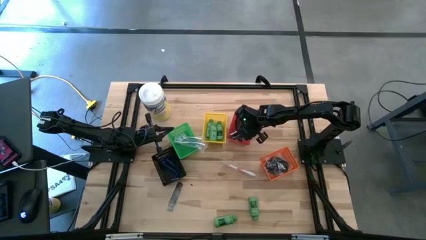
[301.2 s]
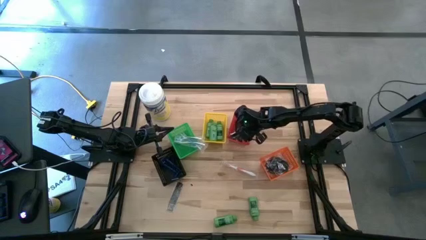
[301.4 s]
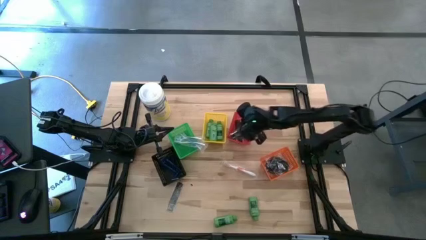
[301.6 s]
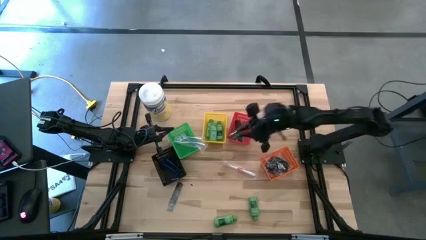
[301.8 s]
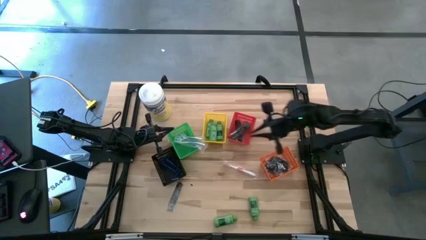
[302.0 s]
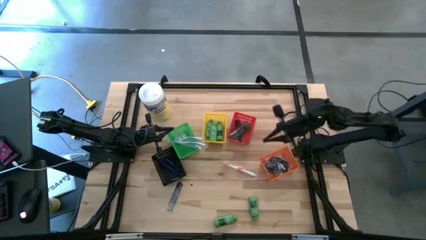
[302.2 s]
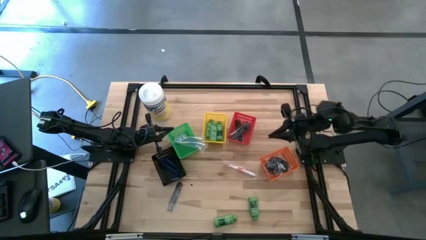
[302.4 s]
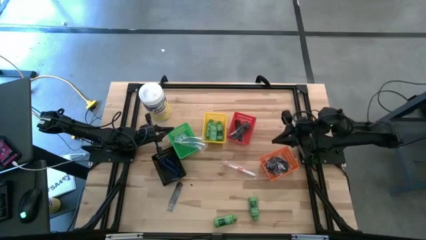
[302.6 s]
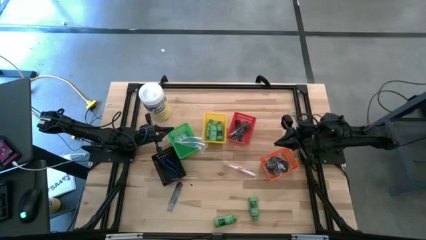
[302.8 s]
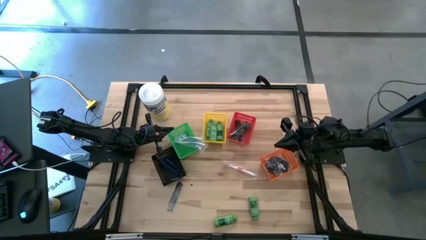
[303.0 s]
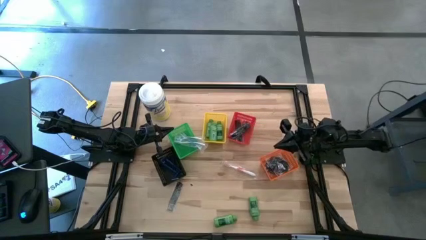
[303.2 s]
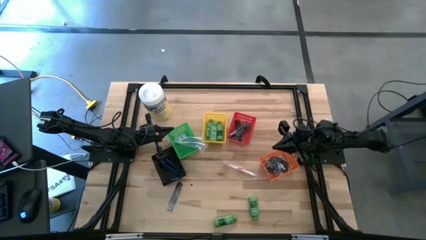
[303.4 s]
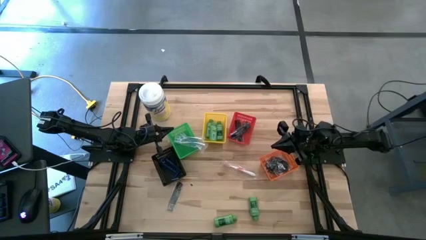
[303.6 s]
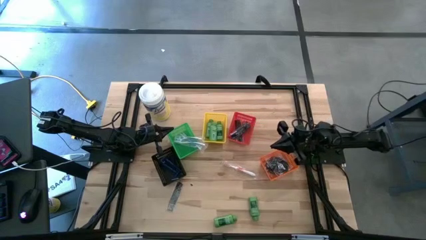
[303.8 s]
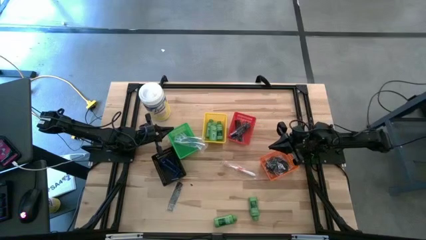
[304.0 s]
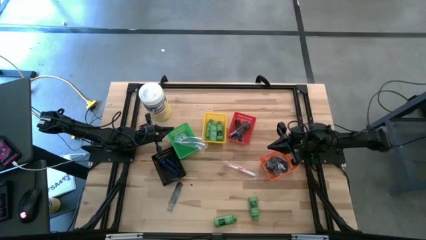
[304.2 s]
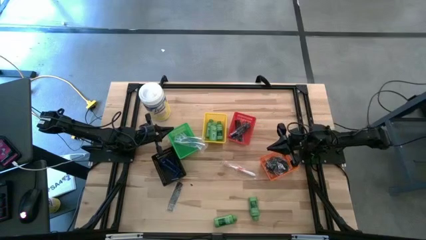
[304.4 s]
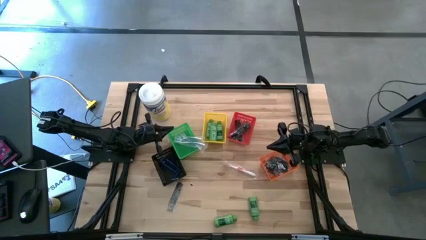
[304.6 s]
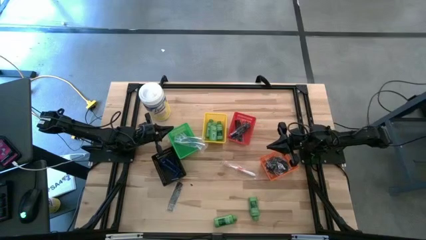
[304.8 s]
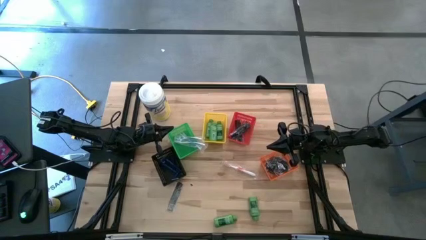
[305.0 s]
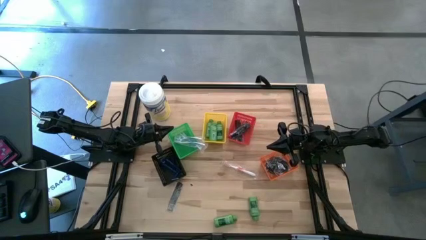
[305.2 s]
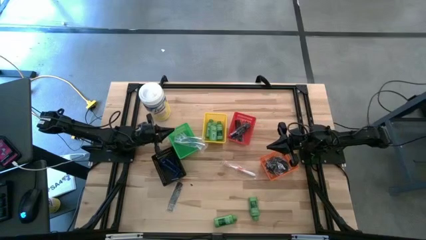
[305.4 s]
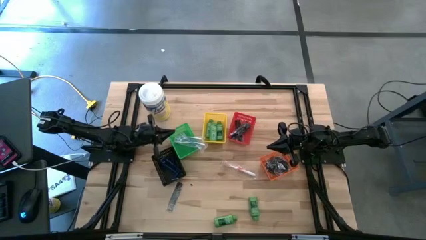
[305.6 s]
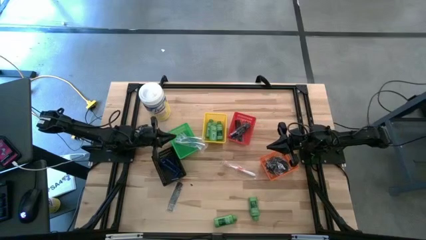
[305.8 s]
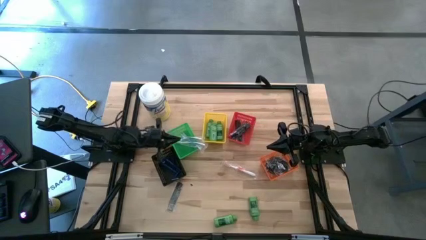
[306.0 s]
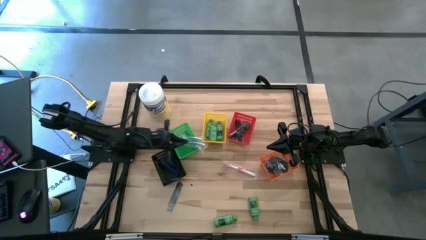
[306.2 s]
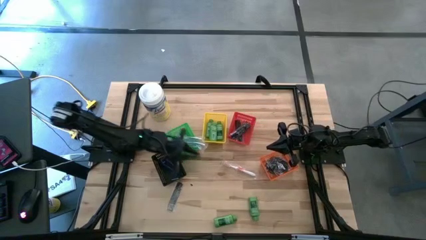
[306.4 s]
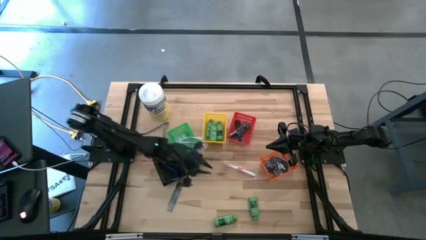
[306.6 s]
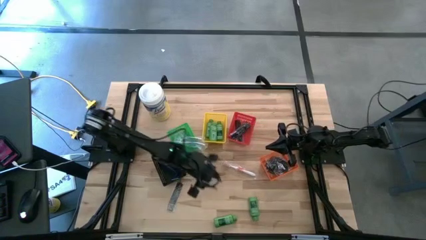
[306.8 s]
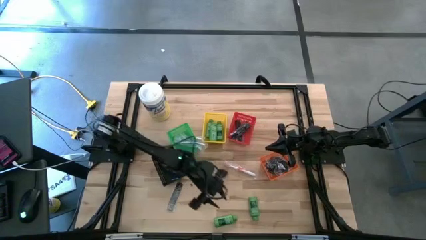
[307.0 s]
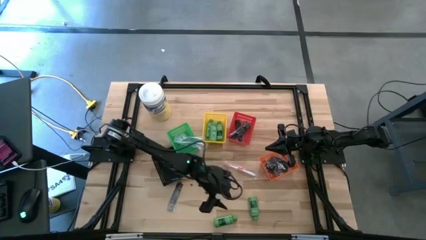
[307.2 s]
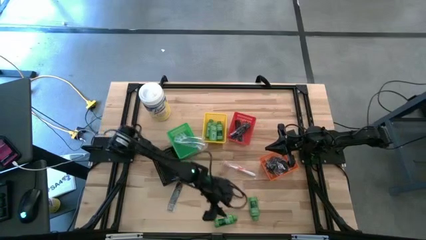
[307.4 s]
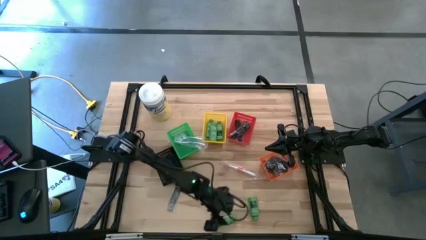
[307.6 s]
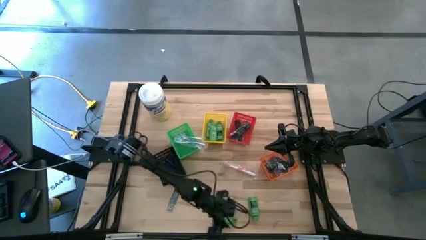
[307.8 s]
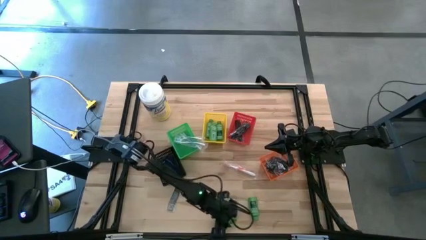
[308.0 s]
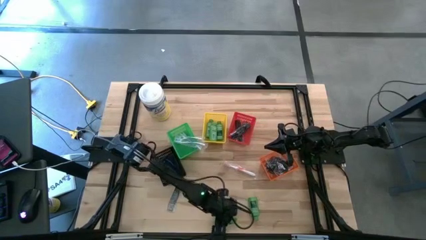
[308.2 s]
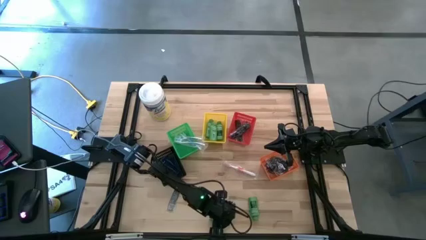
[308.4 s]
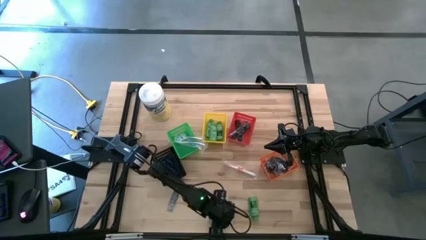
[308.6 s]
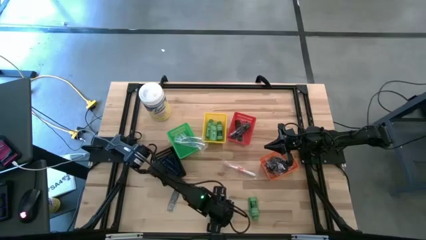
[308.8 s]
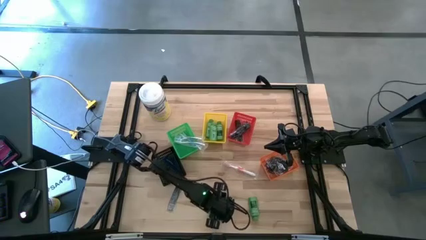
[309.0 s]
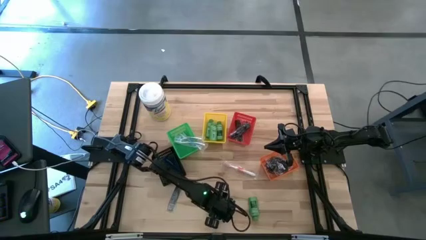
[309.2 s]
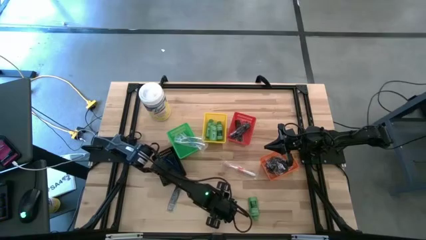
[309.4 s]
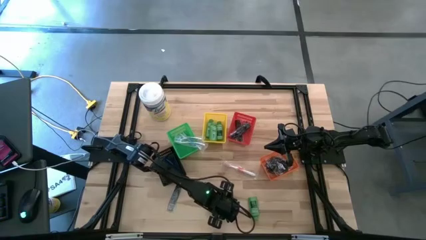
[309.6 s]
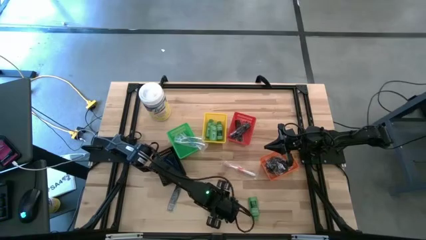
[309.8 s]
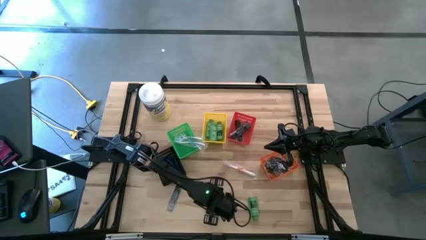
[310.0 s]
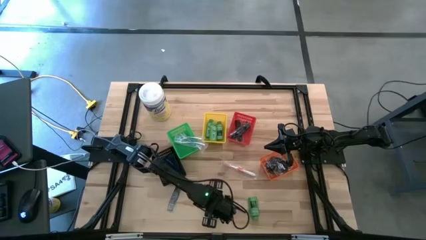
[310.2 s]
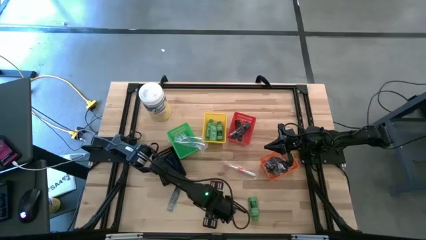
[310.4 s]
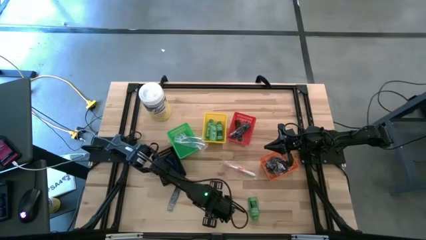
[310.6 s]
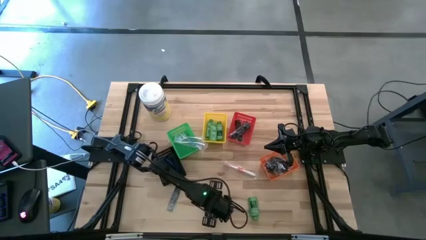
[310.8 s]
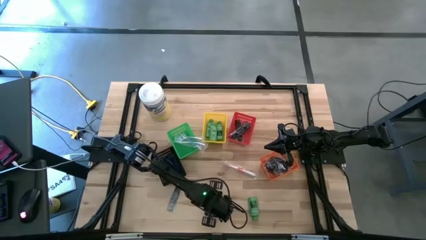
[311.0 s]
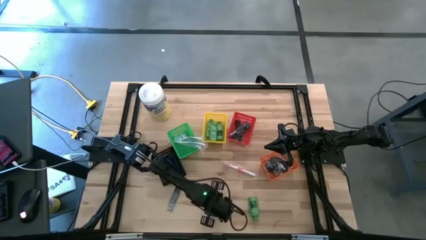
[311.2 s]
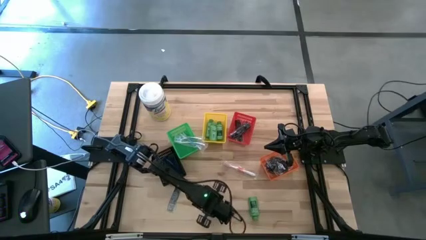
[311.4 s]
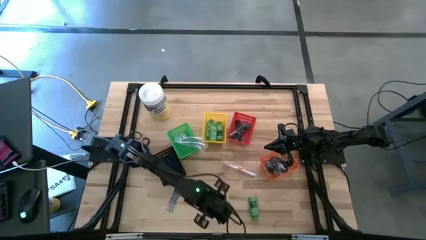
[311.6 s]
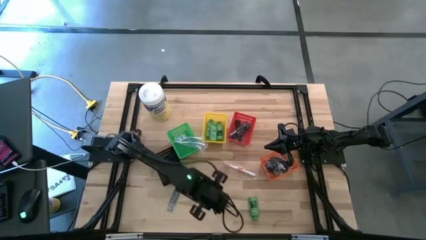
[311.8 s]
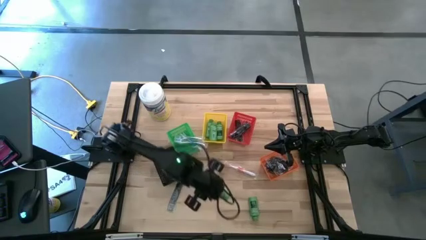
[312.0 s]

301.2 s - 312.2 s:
Task: Pick & Place Travel size toiletries
Put the green shampoo into the yellow bin
